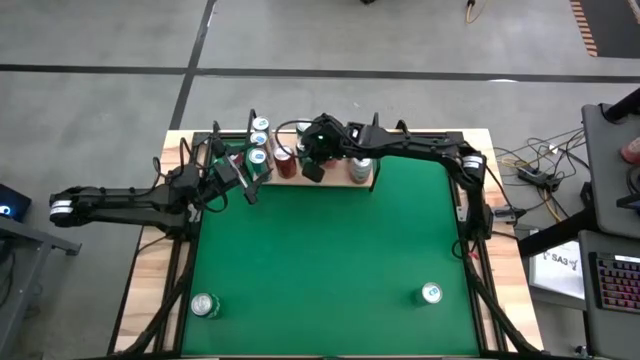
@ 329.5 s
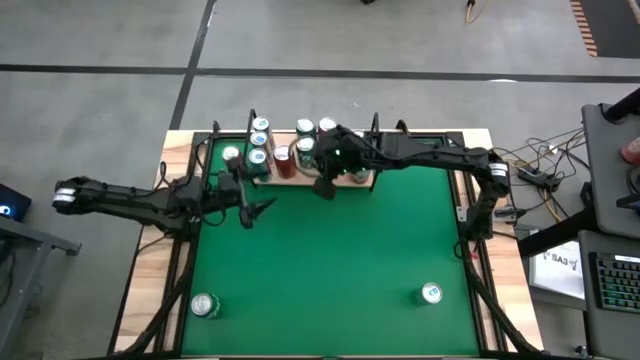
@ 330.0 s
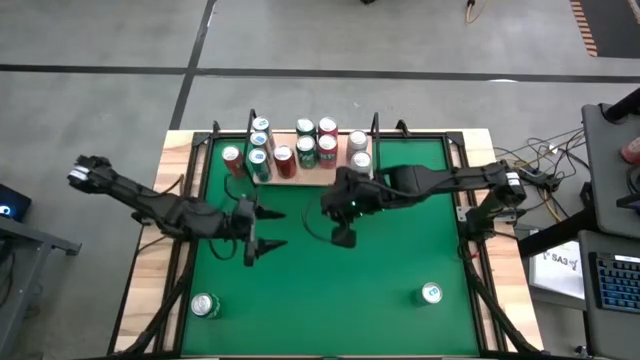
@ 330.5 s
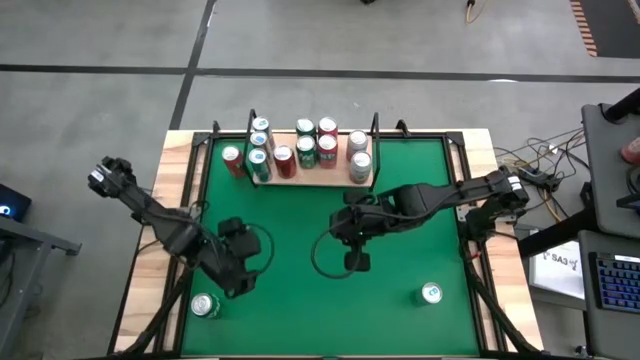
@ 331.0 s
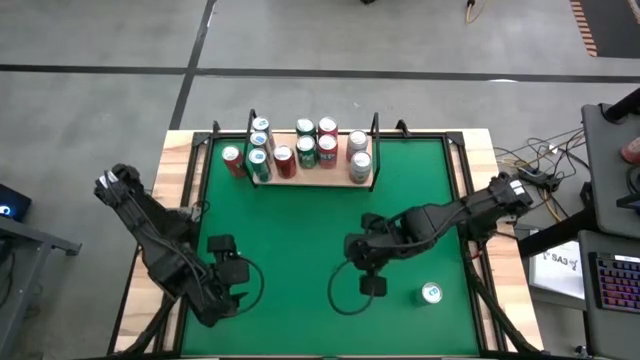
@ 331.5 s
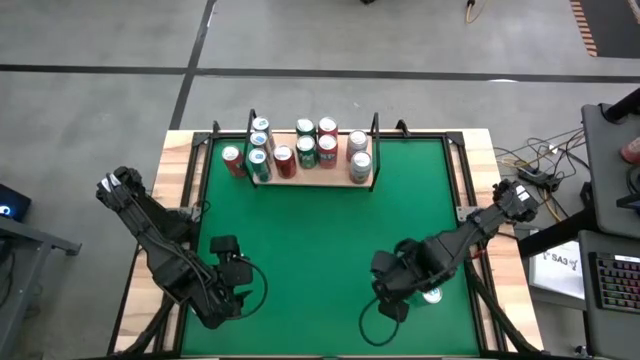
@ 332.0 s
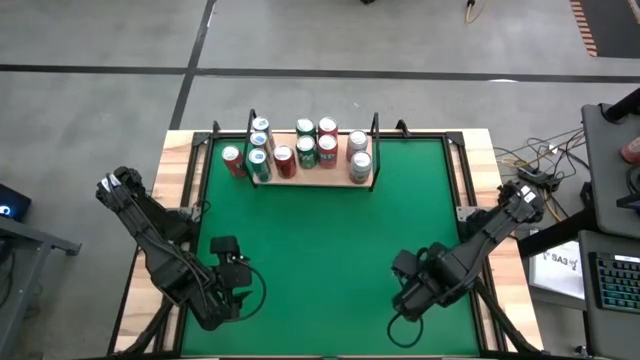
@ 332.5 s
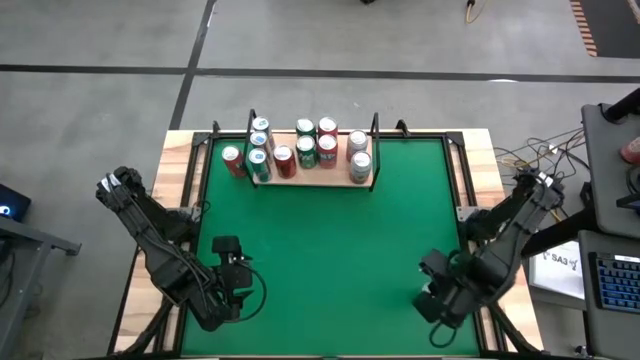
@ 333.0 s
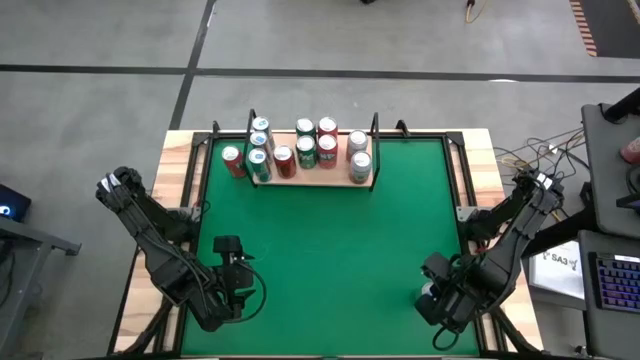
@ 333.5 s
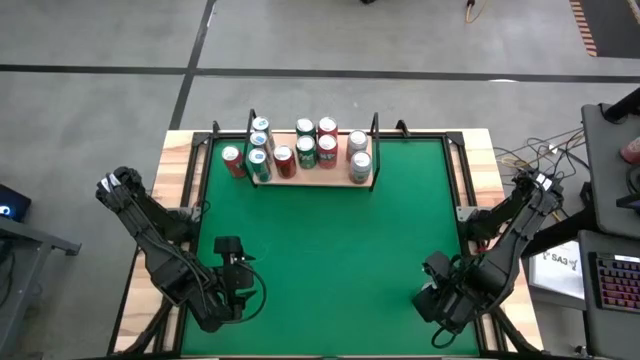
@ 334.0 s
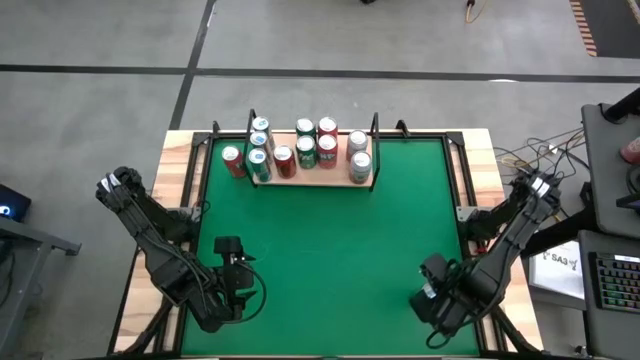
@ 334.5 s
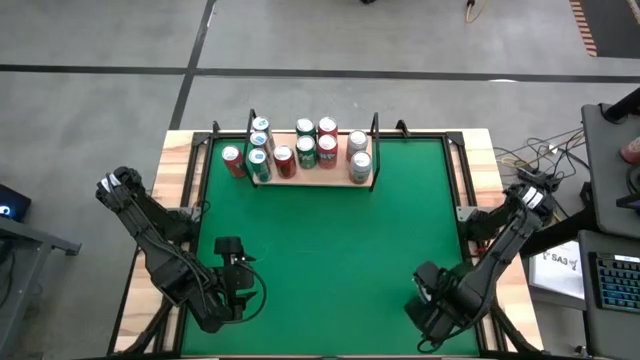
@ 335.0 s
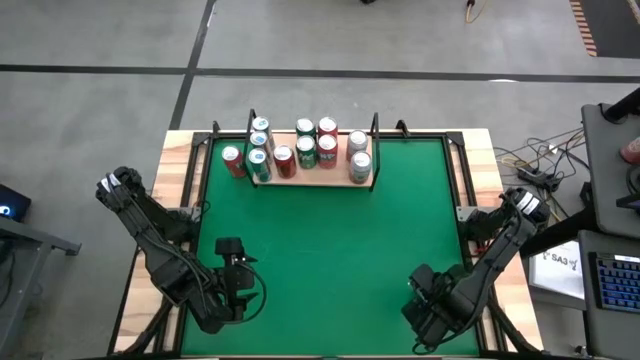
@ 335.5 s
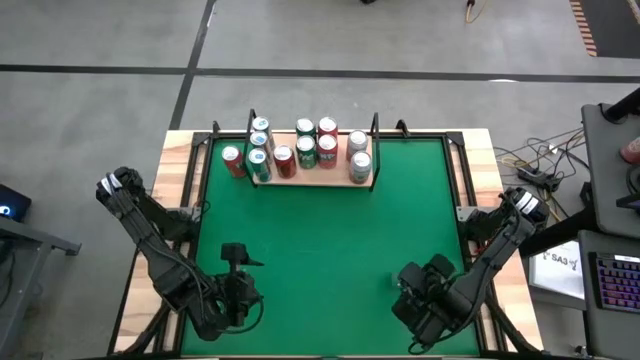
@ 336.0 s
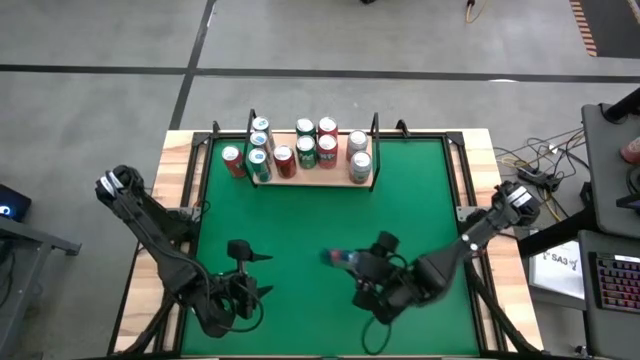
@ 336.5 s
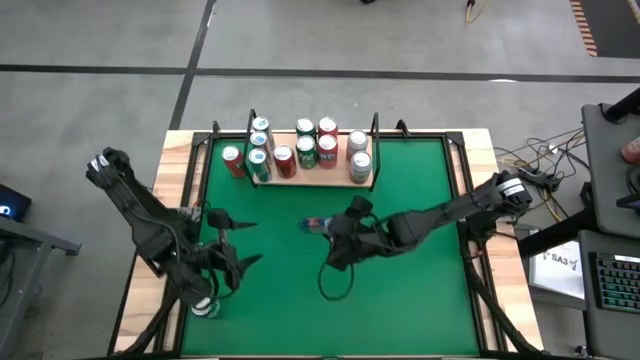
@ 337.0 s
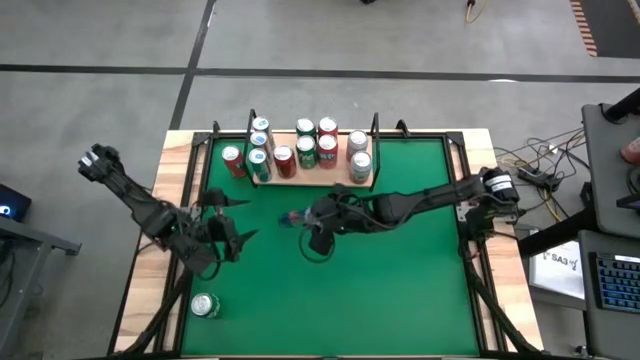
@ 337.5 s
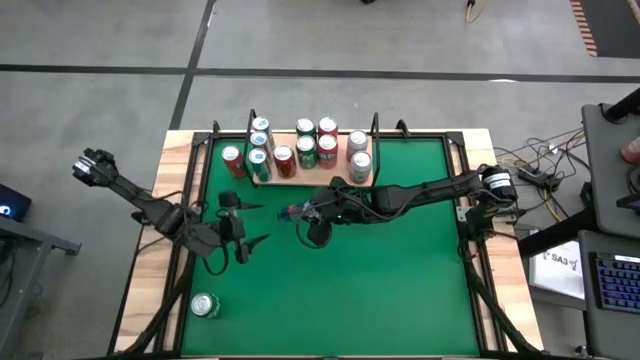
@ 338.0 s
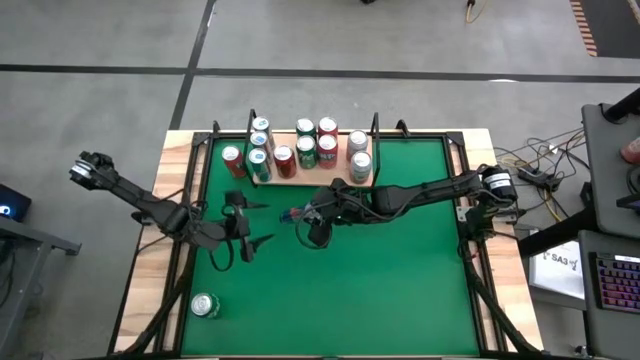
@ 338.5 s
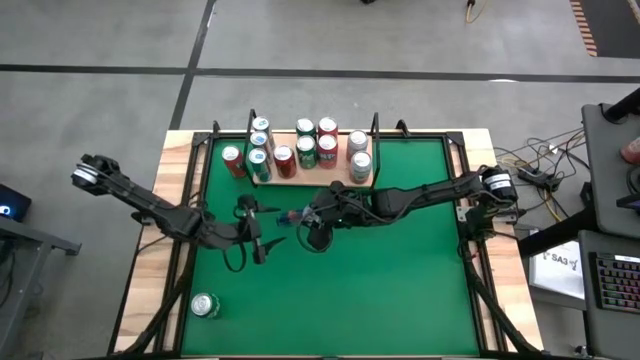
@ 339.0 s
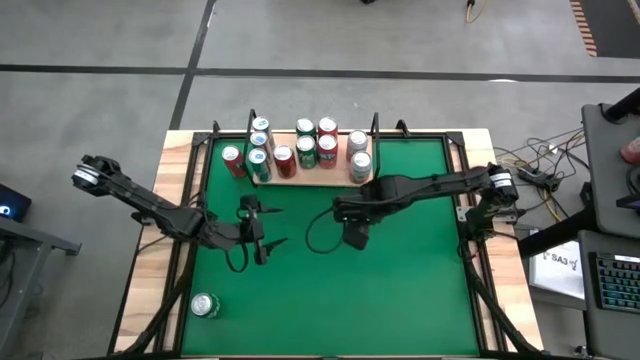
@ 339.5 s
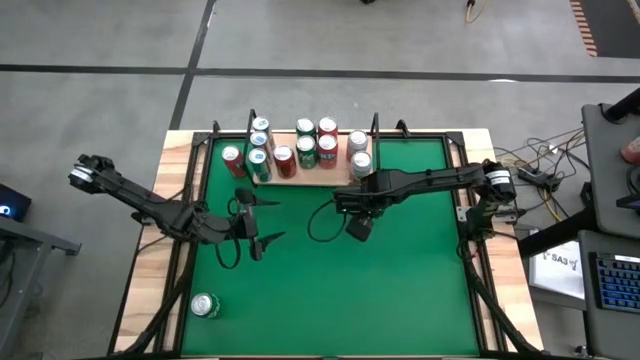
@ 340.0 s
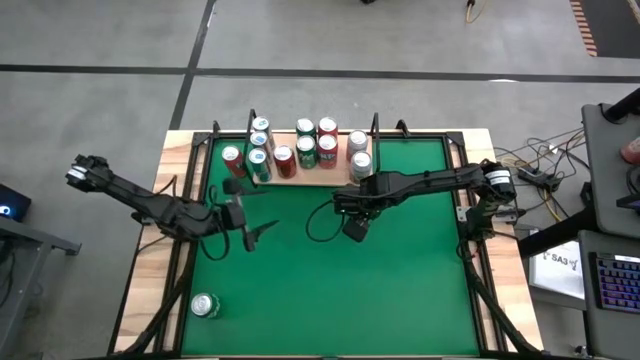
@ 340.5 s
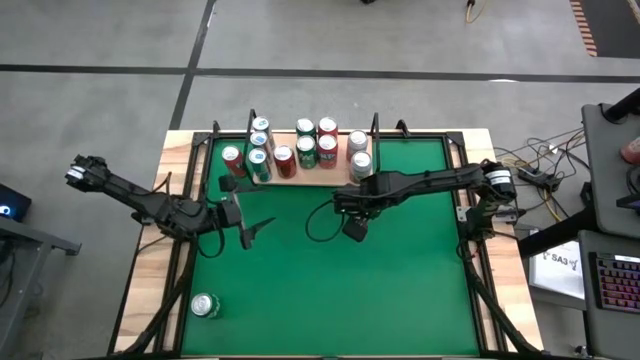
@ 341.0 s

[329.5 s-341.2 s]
Task: Pick and place cans onto a shelf
Move the blue silver soda can below the shelf

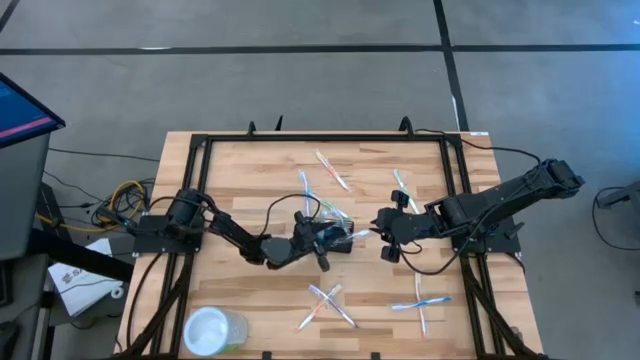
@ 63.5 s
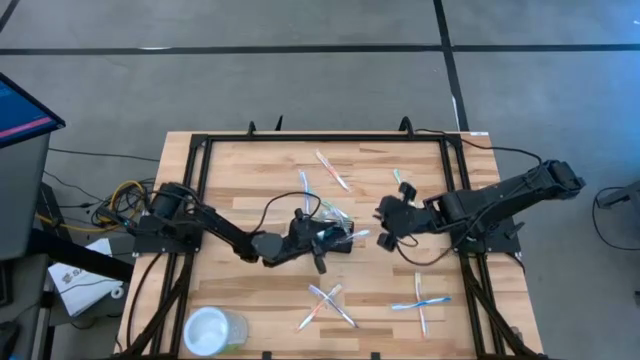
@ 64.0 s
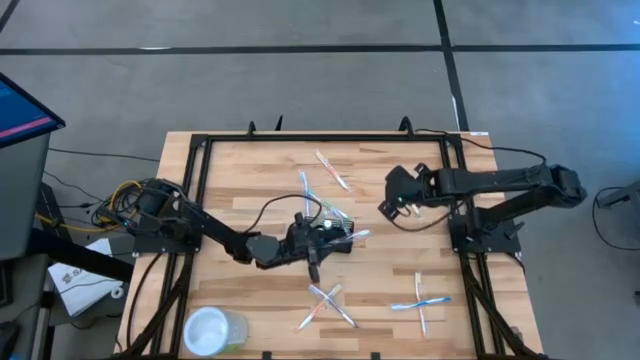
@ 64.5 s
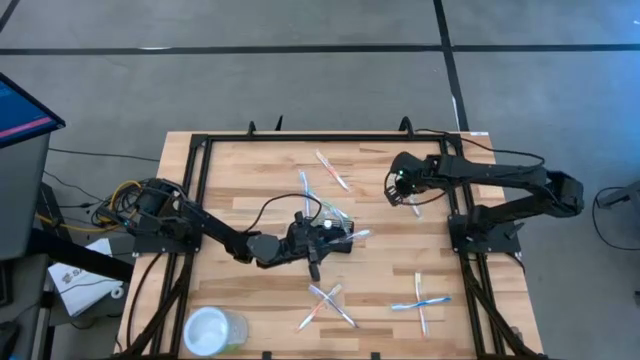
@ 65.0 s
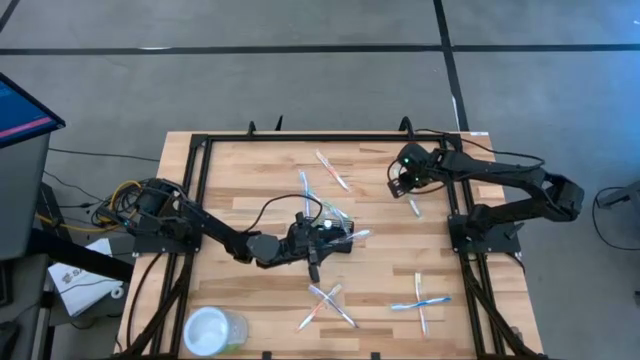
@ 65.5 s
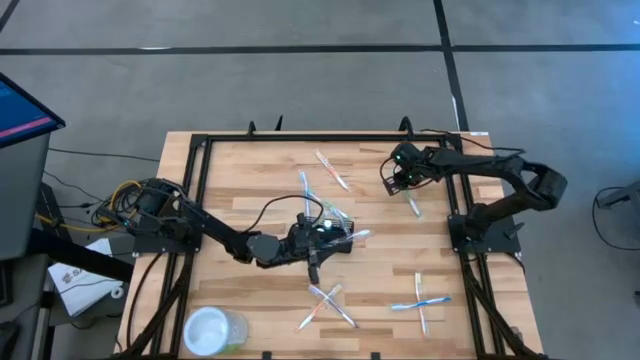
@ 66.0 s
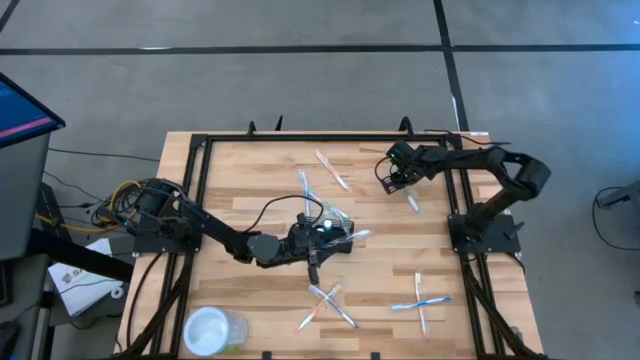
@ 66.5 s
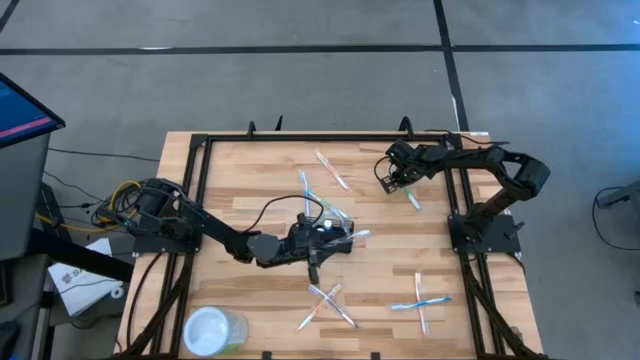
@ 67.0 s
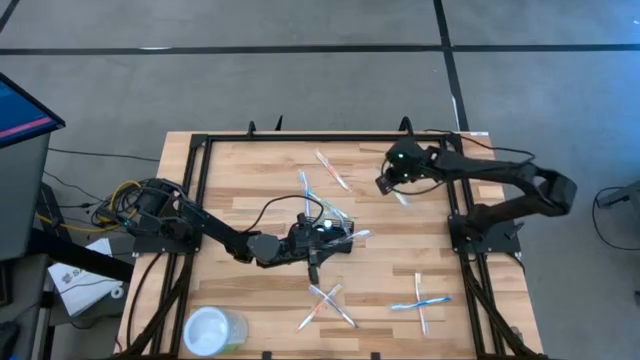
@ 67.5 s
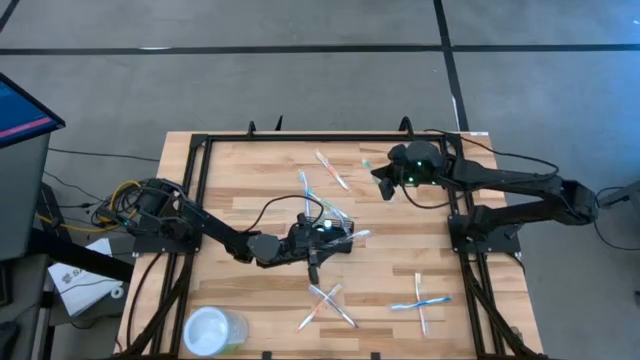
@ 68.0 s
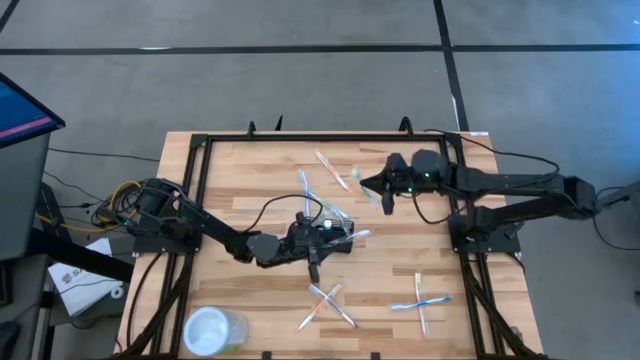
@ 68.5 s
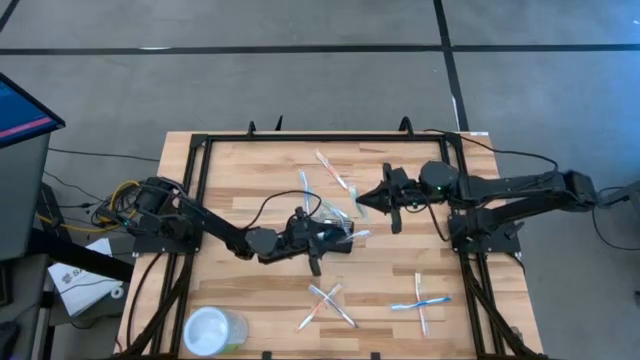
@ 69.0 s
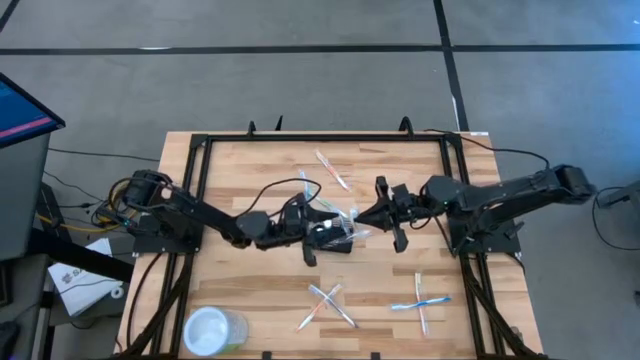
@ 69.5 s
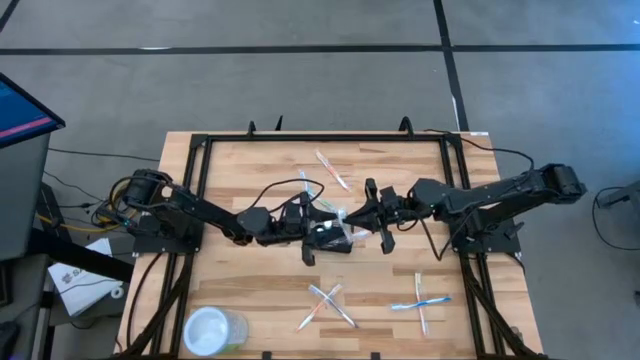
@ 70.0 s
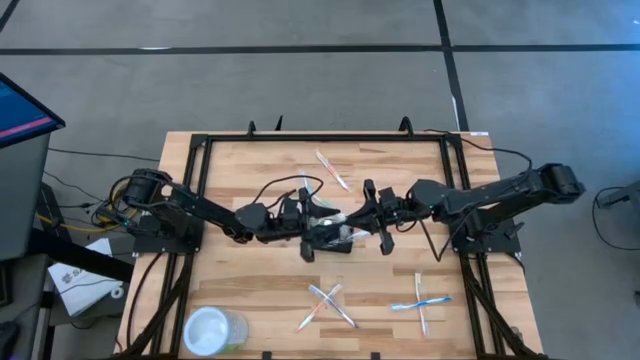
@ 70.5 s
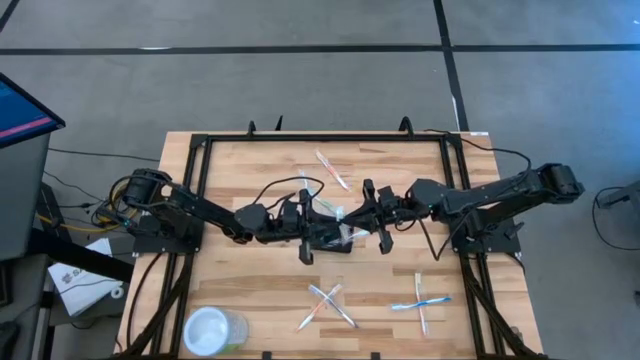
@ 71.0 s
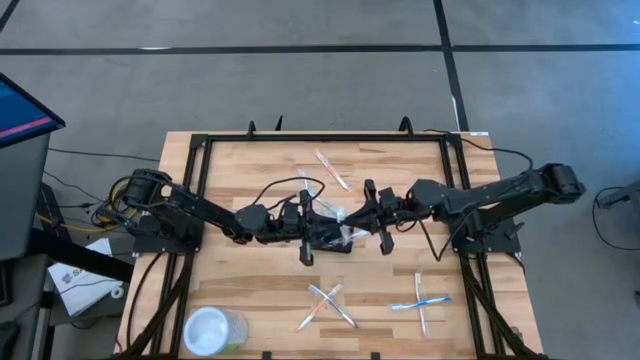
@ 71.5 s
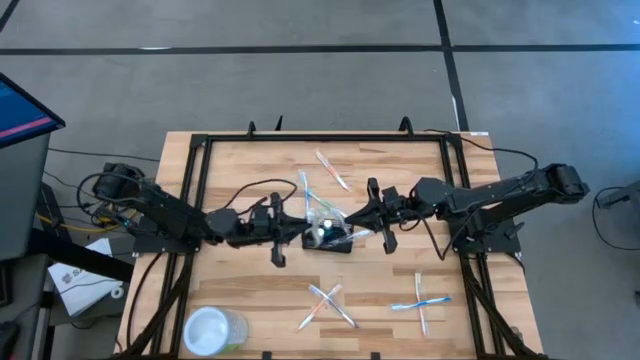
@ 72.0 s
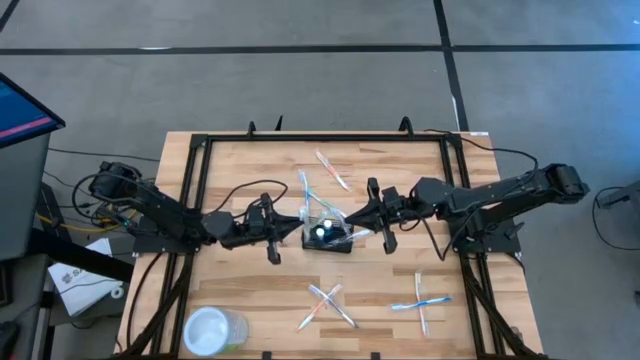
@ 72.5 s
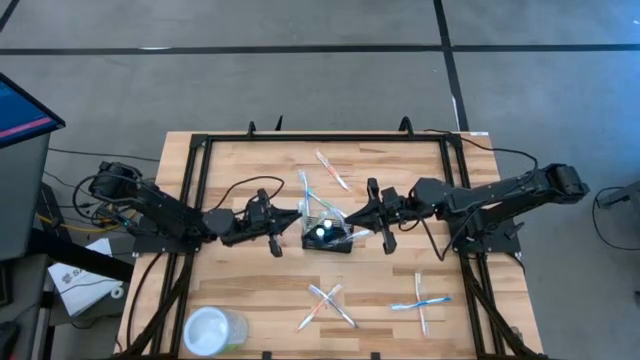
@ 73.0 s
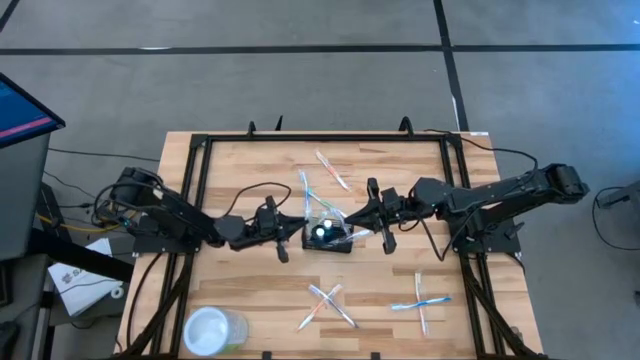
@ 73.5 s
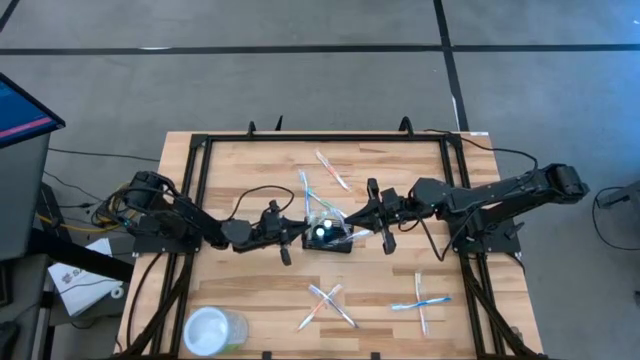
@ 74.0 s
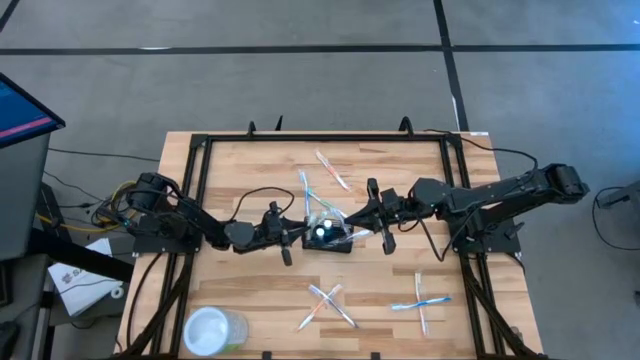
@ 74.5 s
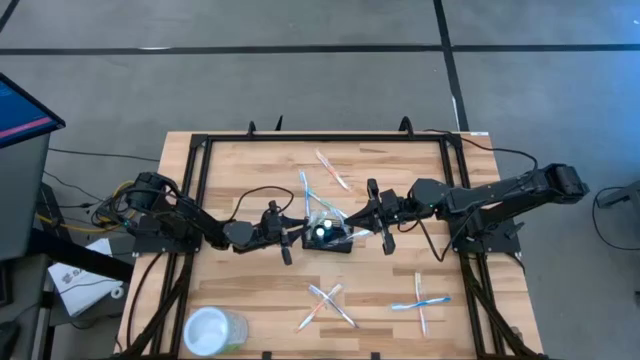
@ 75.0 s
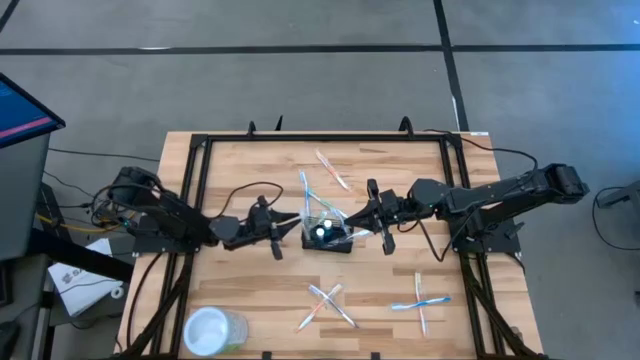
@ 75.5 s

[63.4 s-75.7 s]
Task: Pick & Place toothbrushing station
Put the right green toothbrush into the wire organizer
